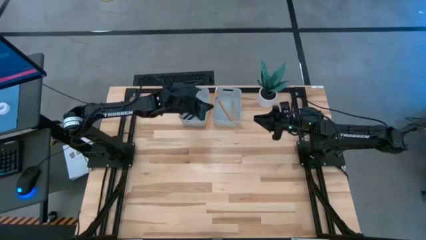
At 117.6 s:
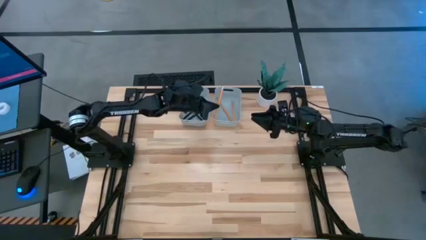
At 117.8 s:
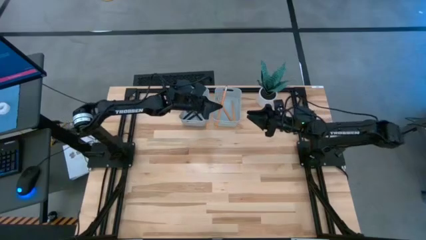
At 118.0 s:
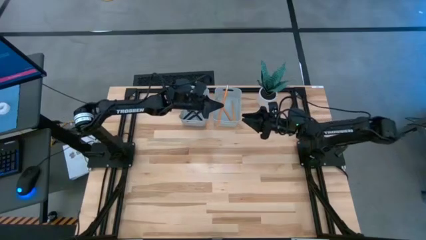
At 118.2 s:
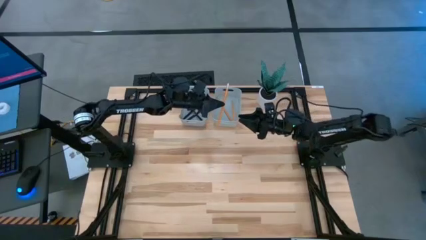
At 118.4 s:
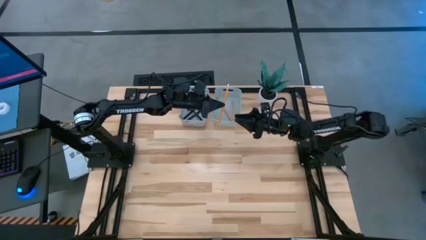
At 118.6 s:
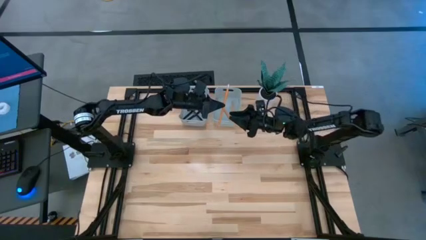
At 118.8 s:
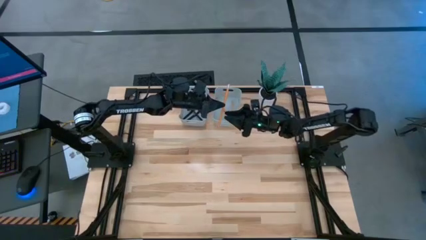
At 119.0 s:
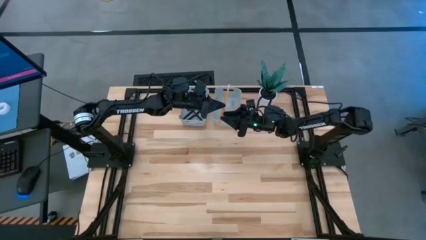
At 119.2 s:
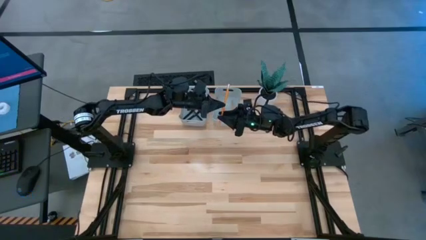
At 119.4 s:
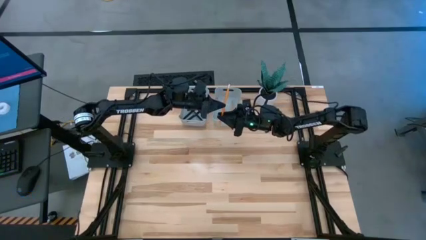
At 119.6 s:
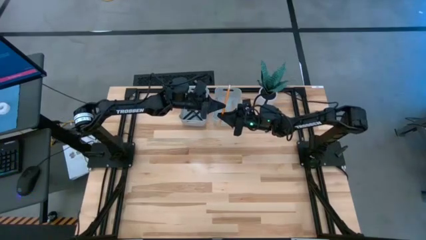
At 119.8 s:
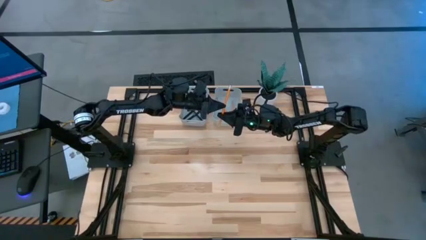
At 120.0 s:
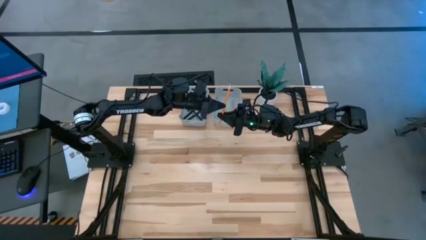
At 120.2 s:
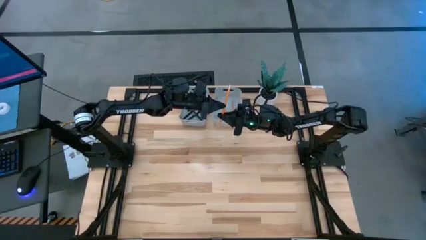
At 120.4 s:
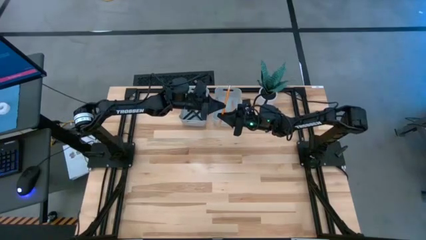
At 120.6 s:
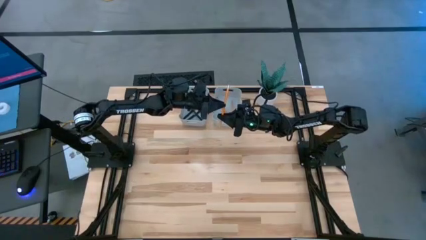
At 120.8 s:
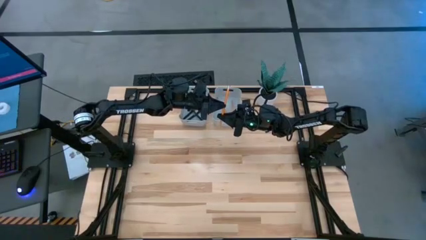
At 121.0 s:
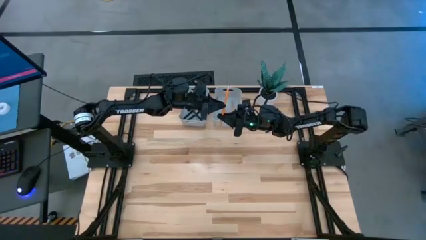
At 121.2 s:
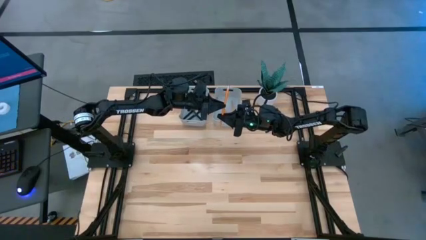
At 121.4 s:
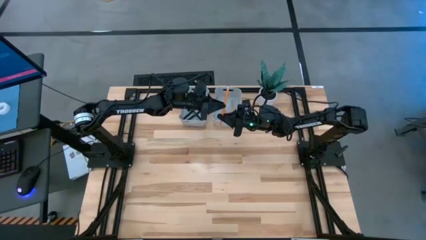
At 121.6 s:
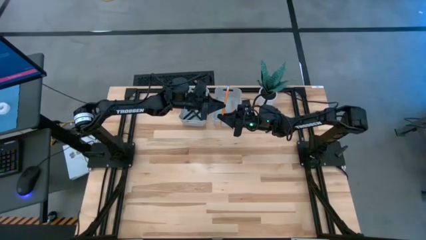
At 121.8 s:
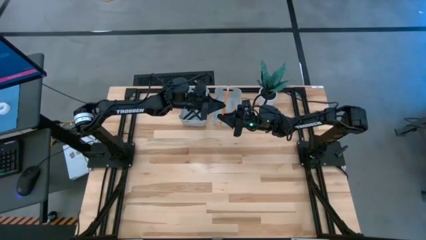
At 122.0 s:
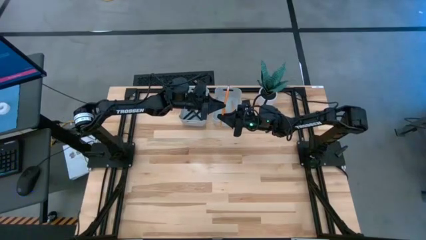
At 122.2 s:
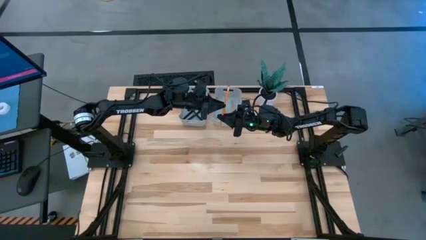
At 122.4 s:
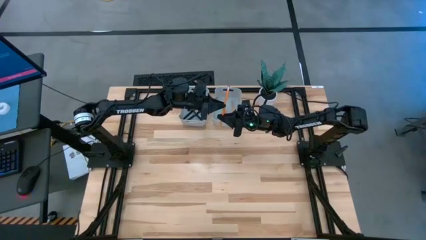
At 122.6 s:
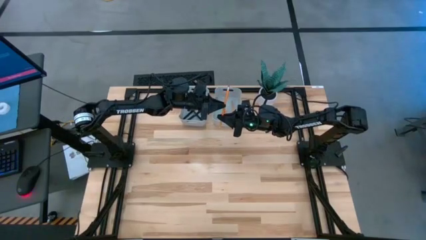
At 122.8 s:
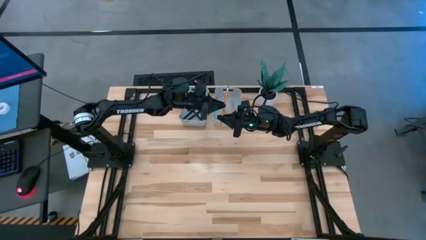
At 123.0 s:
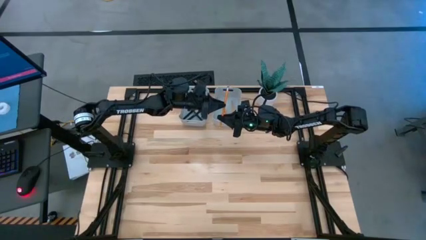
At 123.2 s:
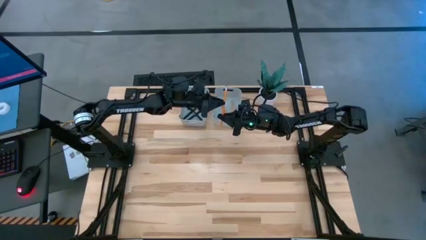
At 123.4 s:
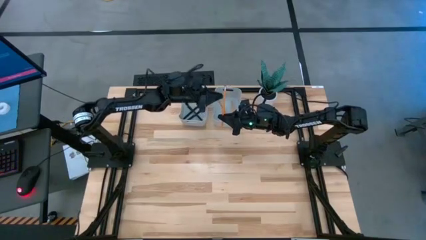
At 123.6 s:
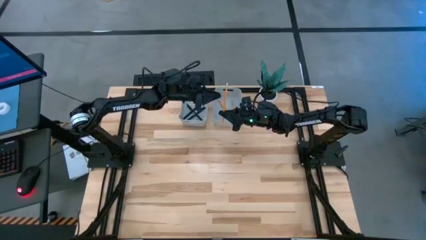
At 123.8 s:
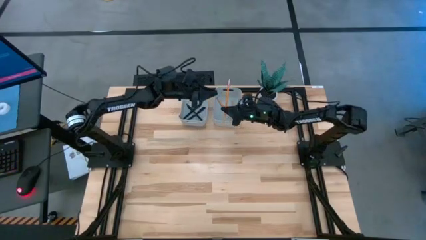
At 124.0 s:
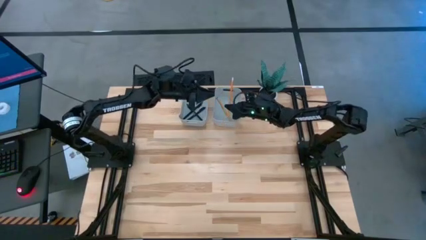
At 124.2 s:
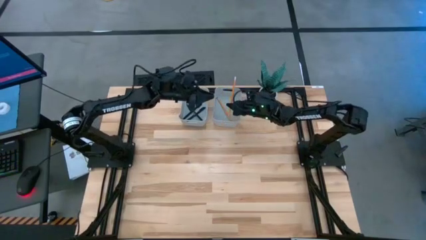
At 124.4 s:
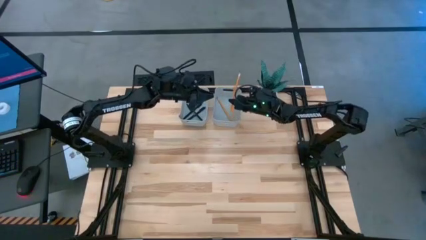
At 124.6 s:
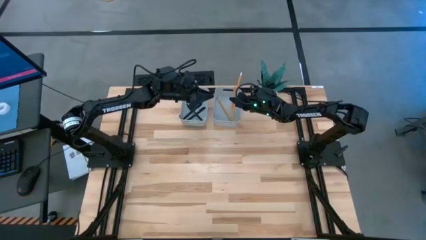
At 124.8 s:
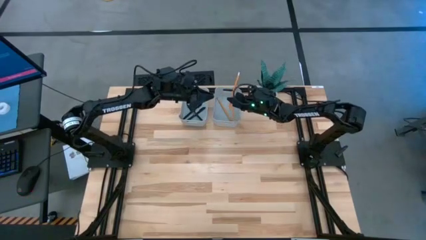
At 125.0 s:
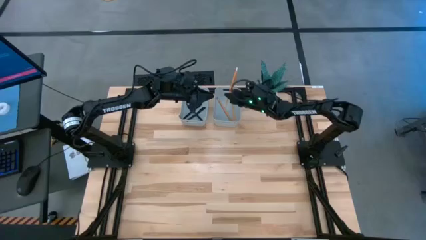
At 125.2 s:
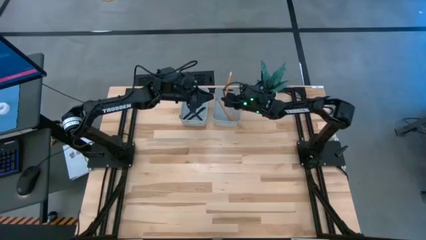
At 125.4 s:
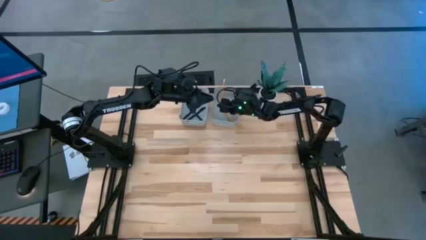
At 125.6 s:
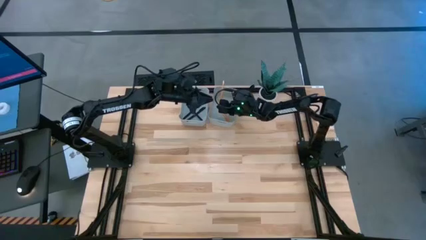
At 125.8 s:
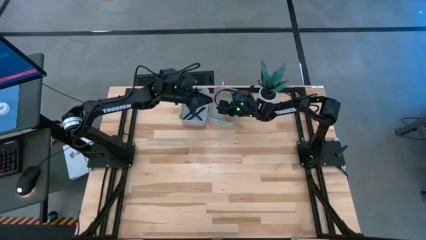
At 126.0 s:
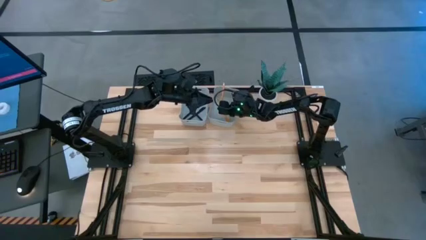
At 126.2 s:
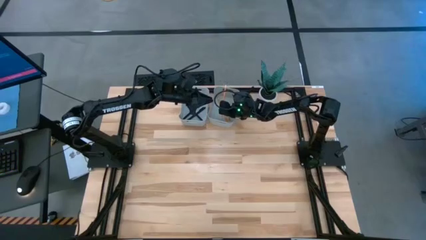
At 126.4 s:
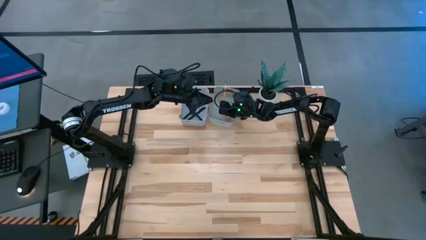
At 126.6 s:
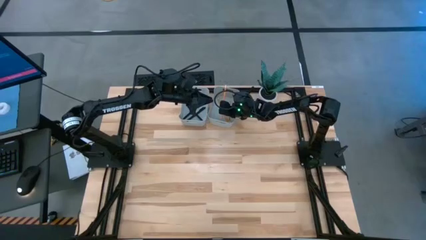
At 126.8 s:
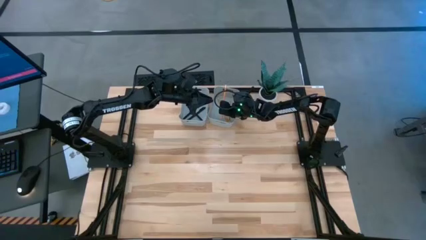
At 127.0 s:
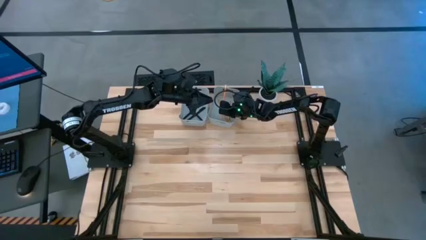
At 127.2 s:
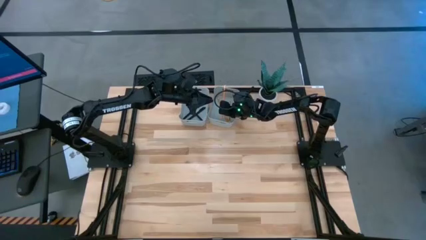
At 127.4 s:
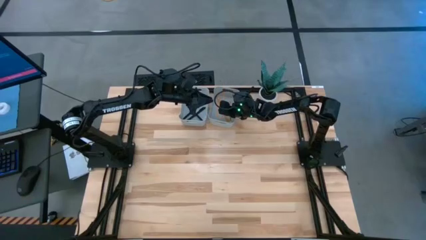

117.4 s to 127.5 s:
Task: Sort pens & pencils
Put the orange pencil into the right gray bin

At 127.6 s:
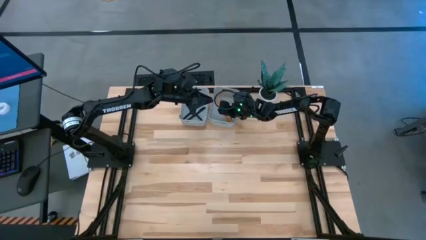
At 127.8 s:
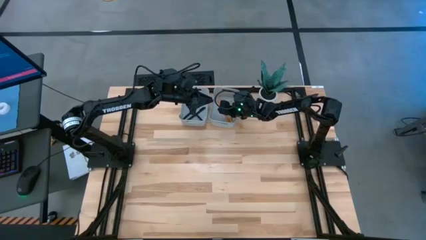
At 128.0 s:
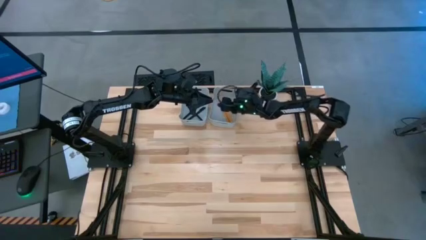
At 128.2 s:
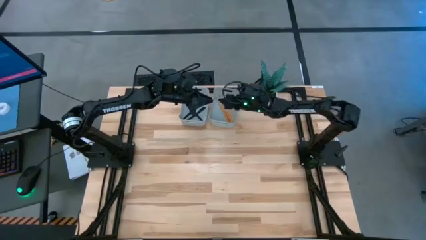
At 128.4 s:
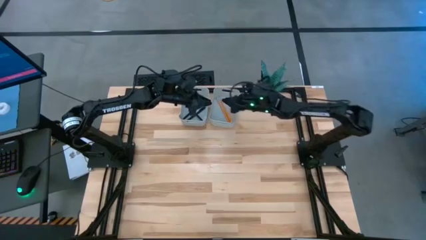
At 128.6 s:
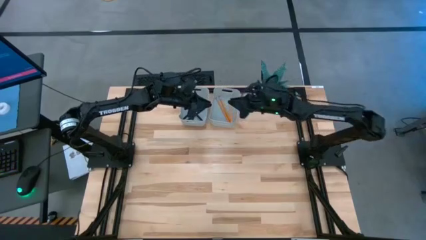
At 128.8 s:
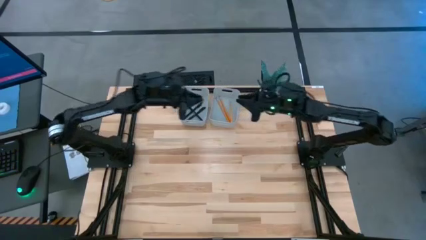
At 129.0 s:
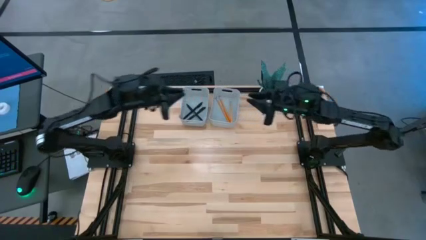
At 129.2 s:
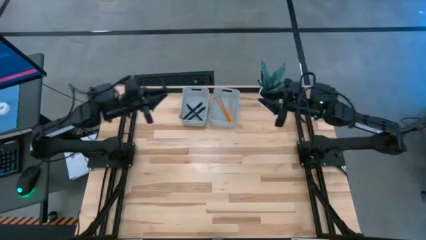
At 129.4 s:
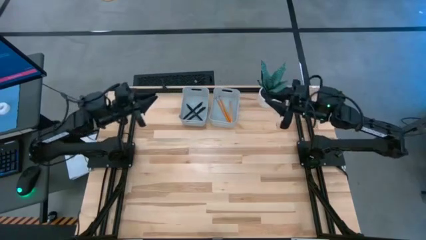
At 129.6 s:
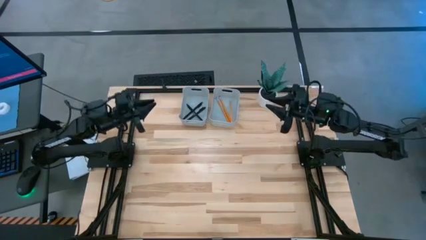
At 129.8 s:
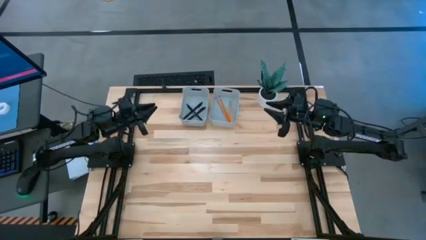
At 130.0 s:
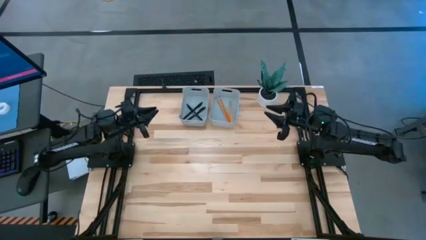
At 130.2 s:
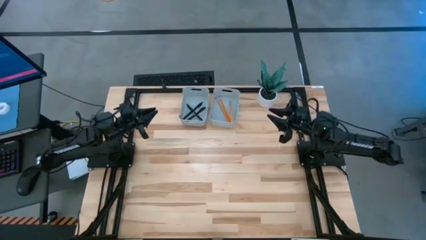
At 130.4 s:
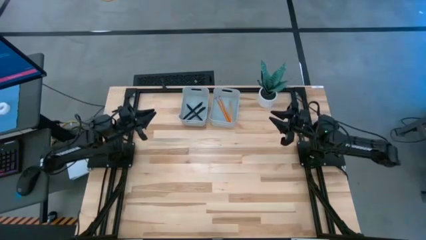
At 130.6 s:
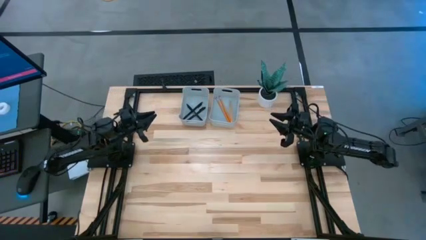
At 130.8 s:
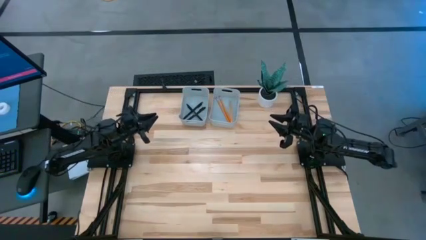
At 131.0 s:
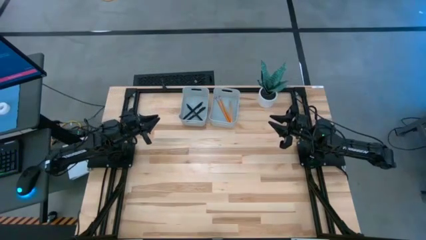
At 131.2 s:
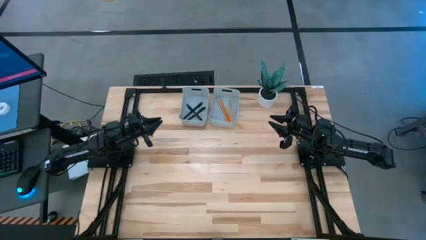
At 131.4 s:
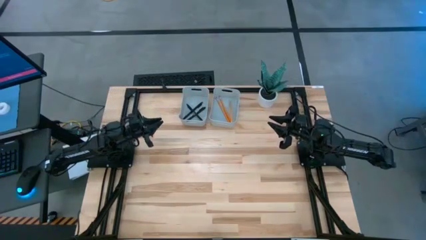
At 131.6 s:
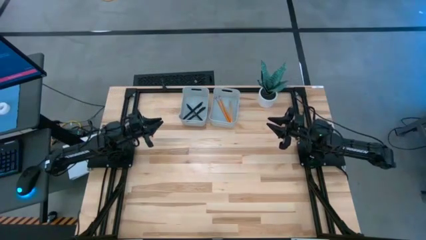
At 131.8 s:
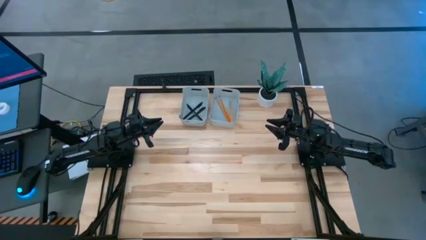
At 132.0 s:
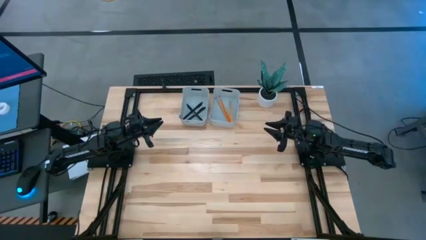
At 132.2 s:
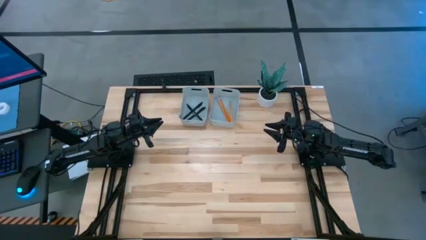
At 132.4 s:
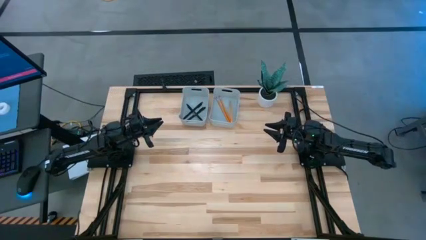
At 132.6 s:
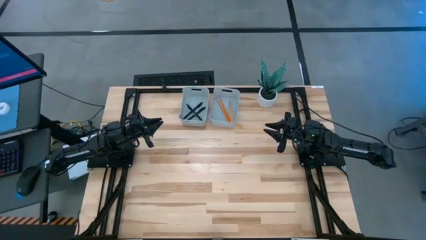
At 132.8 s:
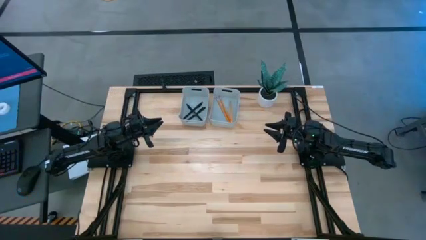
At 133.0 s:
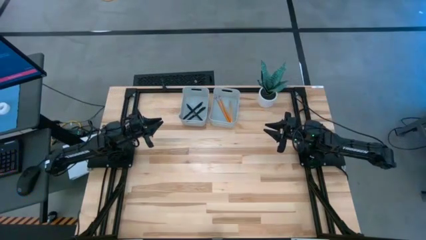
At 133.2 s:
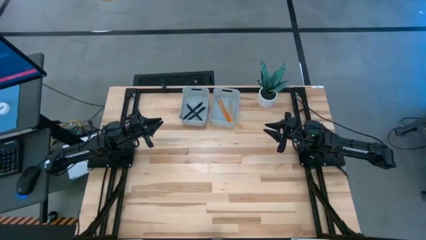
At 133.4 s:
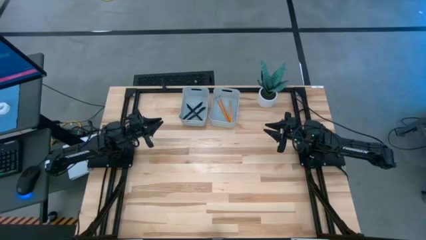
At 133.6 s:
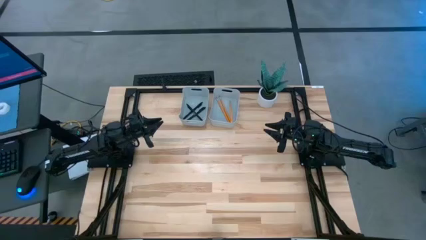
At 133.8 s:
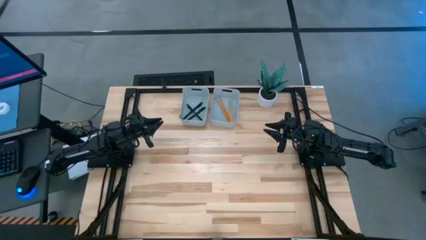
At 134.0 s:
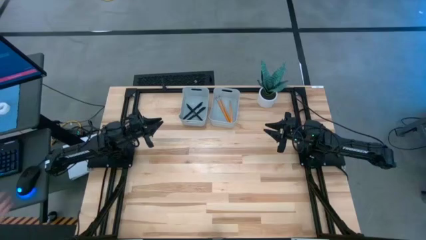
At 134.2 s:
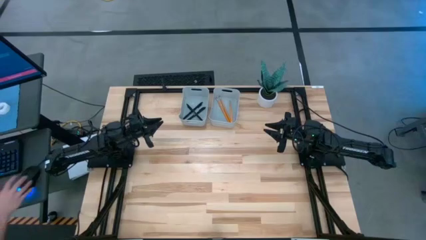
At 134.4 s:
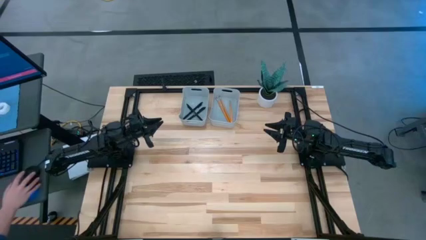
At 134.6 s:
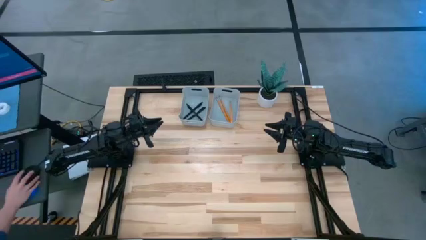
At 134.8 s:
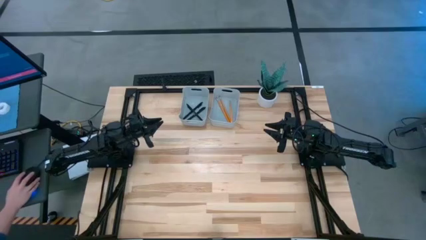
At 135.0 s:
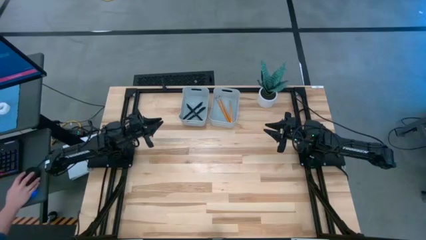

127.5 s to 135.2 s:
Return to Home Position
